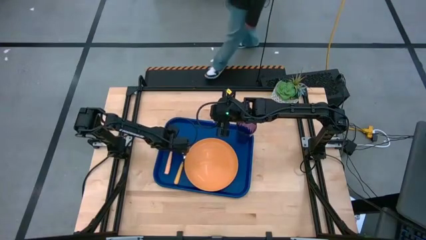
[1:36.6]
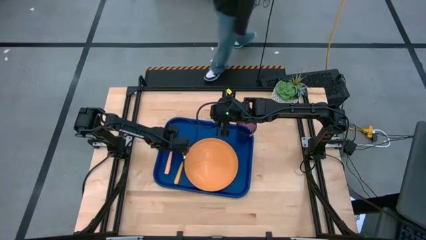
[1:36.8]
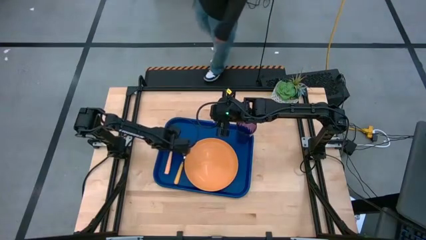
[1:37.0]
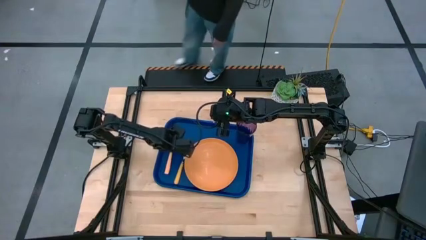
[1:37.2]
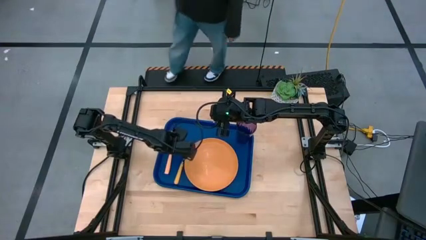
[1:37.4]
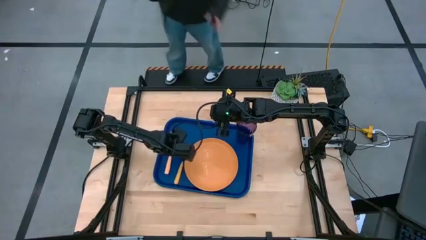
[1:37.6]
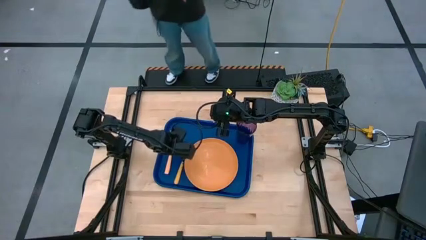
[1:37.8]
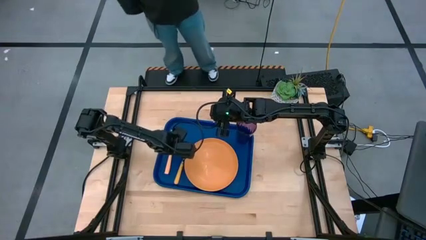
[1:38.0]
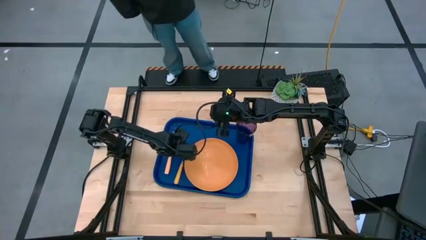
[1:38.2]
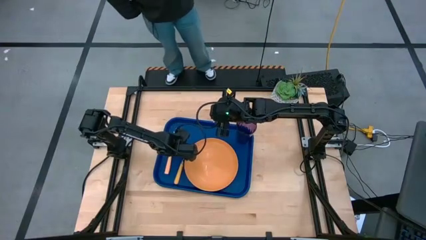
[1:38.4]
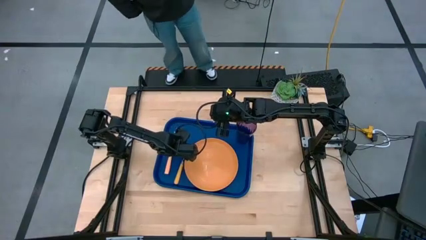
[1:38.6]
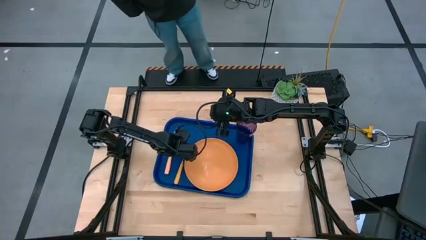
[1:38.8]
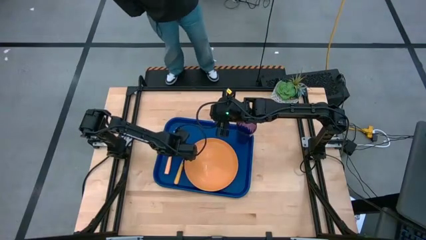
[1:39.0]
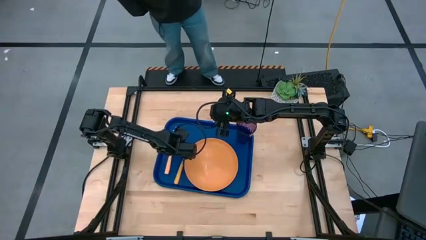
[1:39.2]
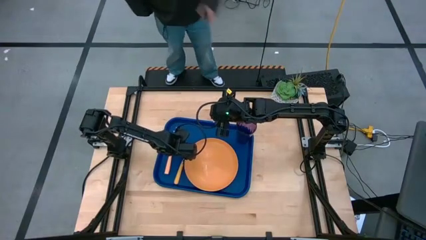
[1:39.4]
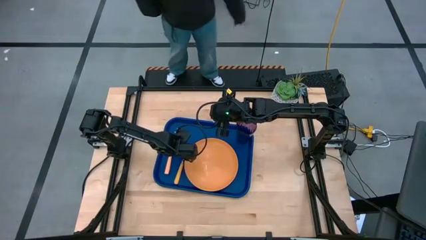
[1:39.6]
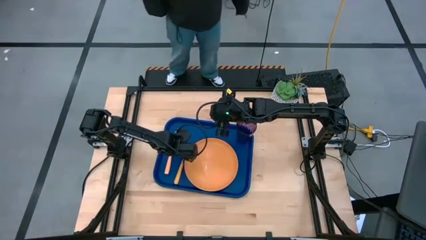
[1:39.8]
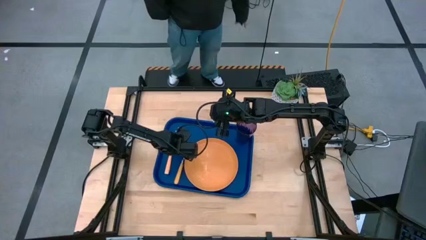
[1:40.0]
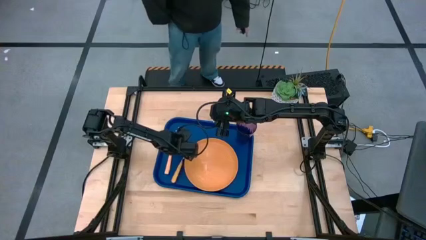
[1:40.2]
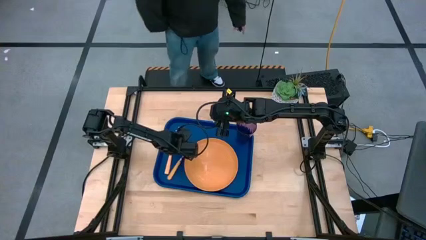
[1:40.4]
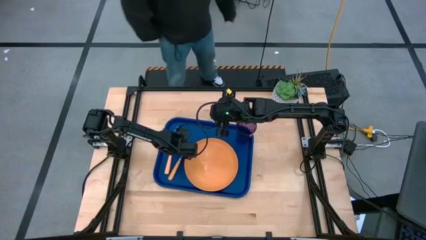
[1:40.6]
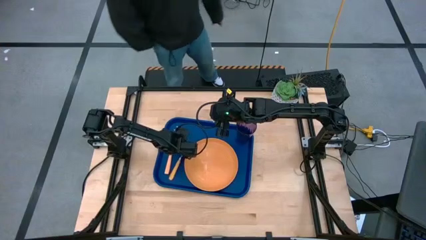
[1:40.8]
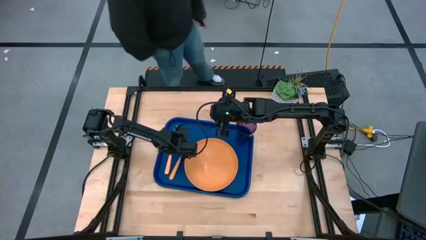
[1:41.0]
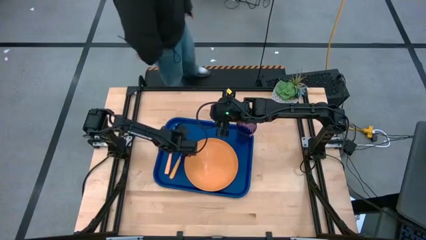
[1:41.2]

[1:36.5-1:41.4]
Task: Pick and place plate/cup/fork/spoon on tray
Adjust the yellow spoon on the blue serving tray

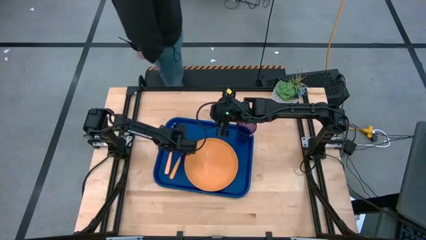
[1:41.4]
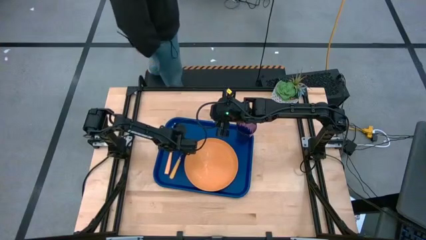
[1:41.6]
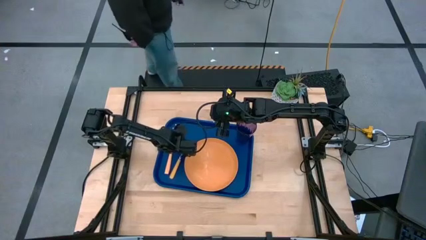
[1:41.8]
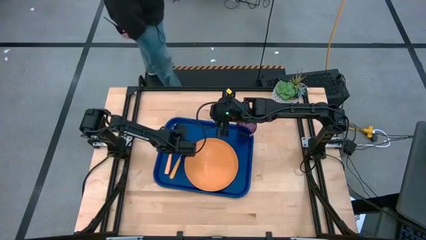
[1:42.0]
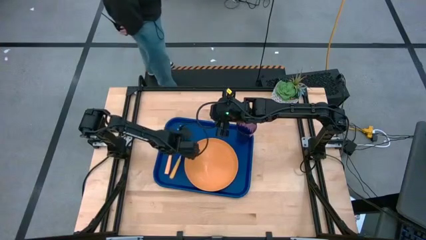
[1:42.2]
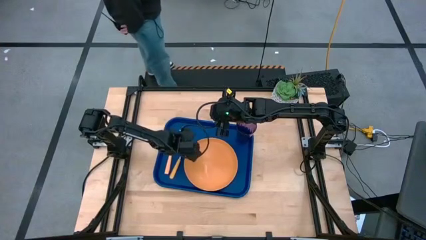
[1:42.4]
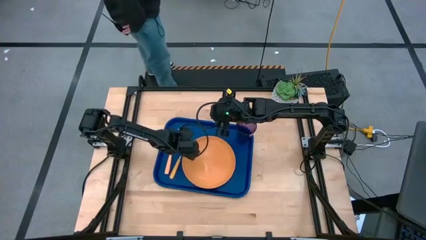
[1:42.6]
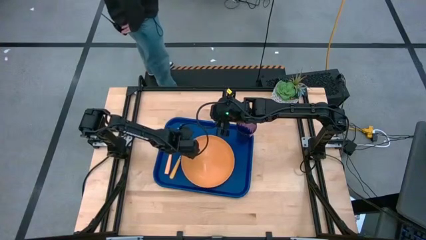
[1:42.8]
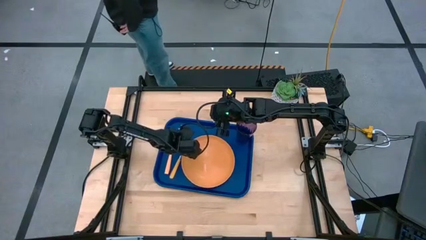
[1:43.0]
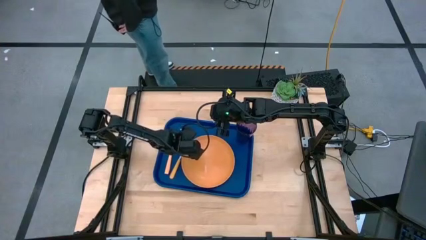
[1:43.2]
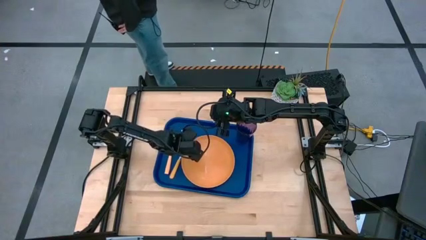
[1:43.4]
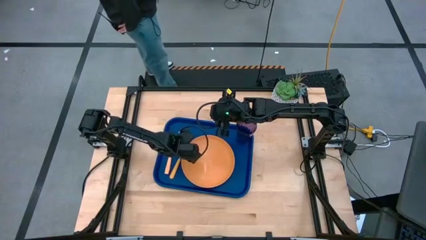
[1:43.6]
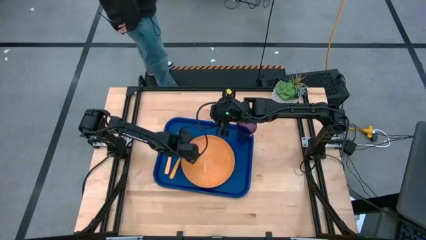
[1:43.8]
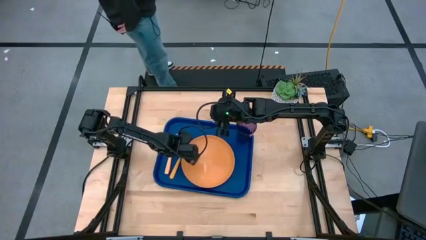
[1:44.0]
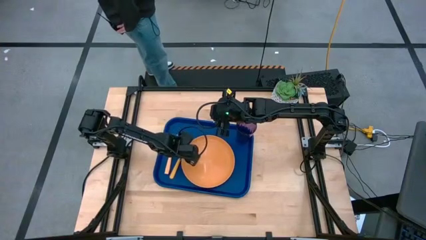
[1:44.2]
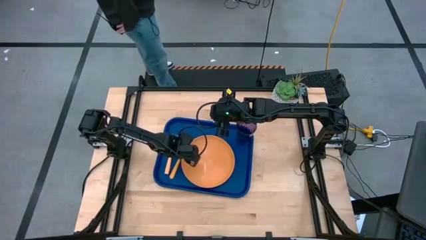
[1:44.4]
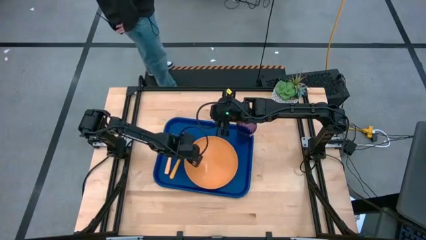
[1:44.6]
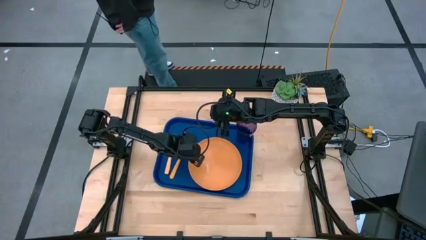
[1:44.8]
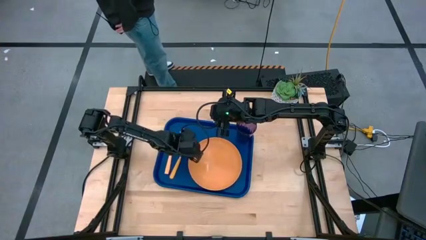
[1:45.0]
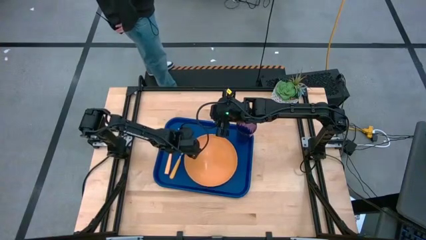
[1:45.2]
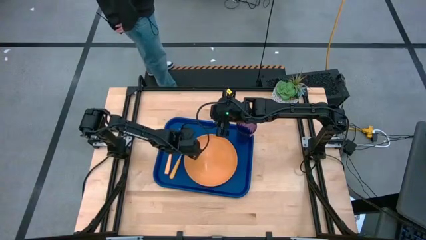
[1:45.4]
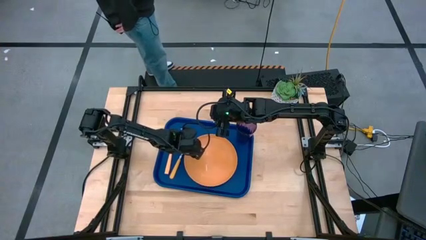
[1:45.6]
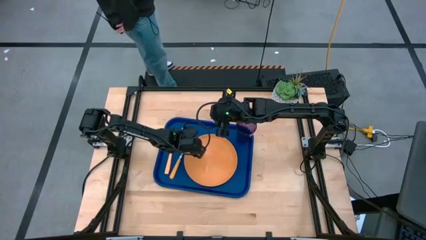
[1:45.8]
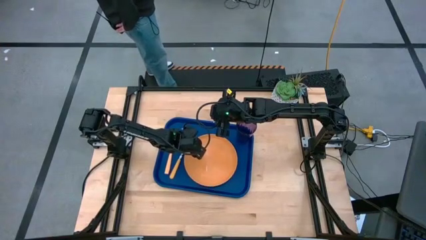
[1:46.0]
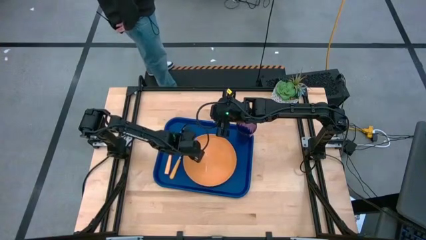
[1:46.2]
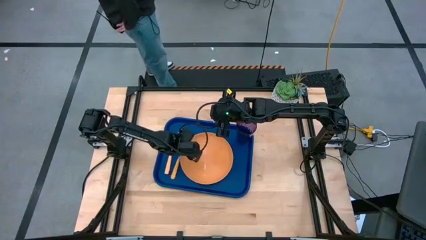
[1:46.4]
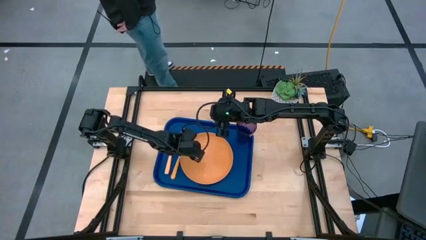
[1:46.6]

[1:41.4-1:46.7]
Adjust the orange plate on the blue serving tray
